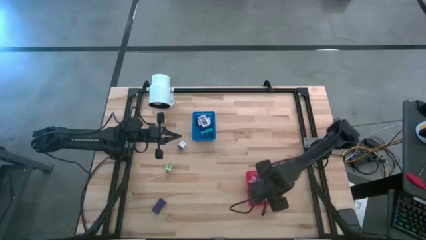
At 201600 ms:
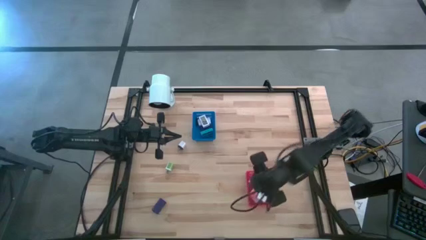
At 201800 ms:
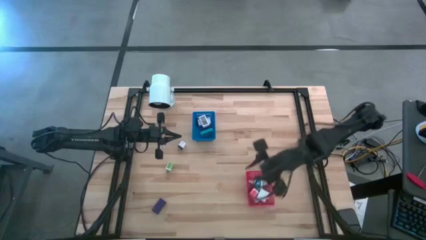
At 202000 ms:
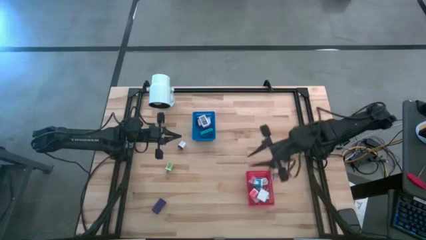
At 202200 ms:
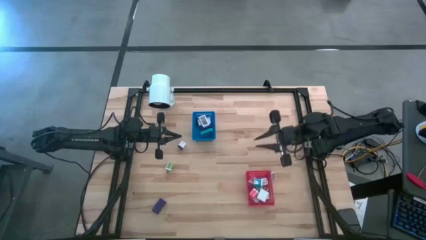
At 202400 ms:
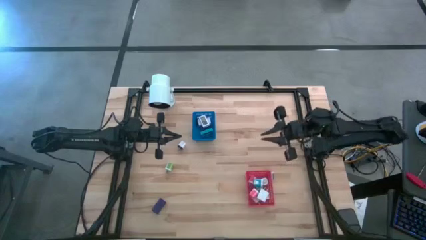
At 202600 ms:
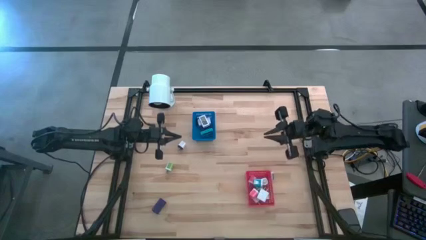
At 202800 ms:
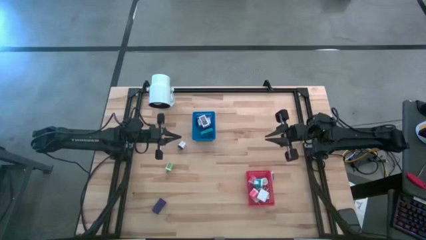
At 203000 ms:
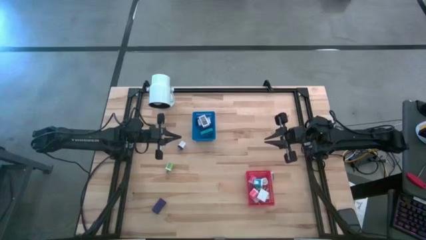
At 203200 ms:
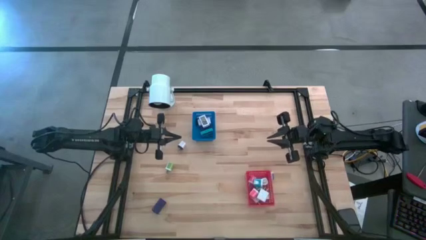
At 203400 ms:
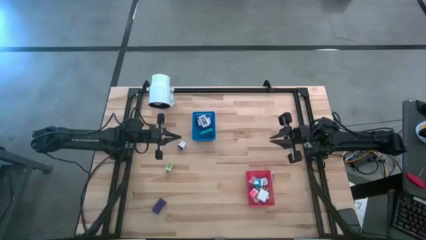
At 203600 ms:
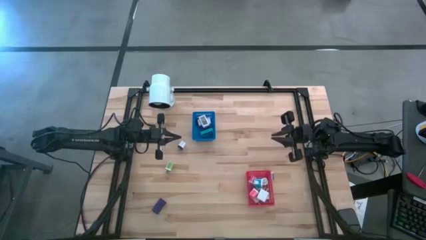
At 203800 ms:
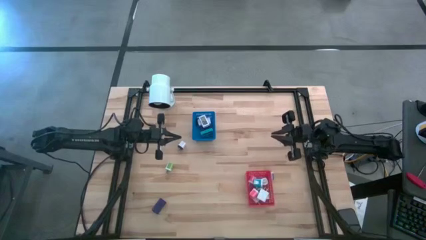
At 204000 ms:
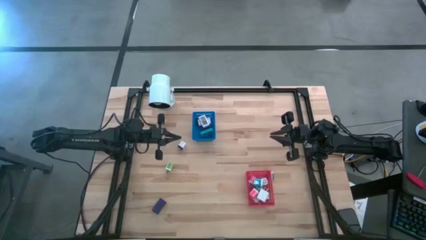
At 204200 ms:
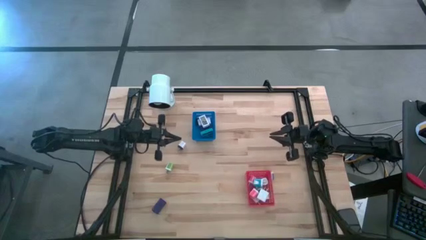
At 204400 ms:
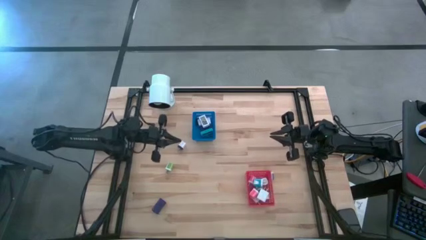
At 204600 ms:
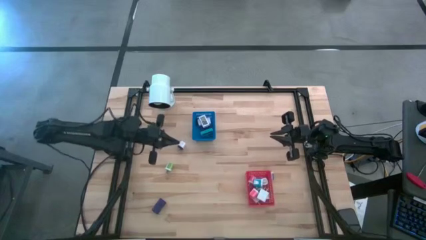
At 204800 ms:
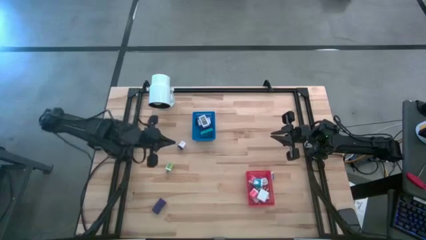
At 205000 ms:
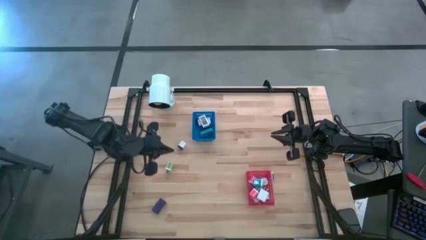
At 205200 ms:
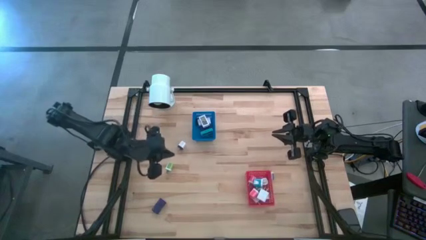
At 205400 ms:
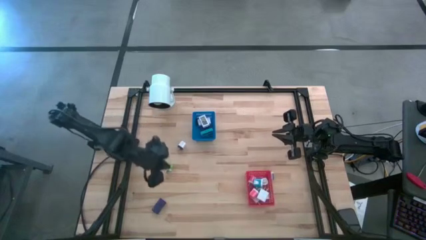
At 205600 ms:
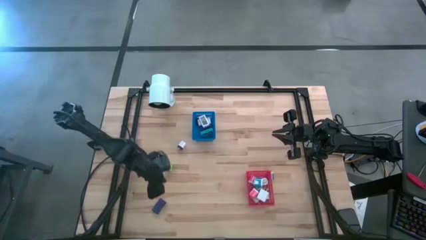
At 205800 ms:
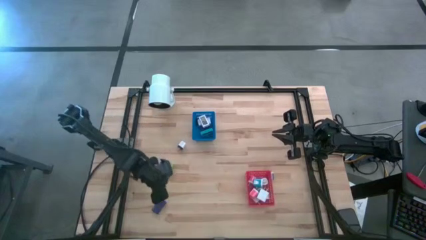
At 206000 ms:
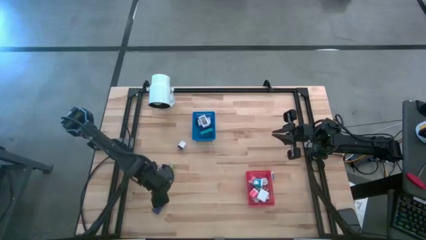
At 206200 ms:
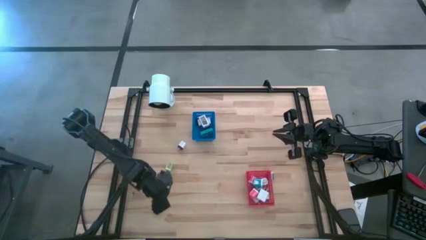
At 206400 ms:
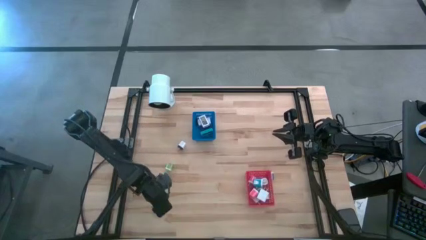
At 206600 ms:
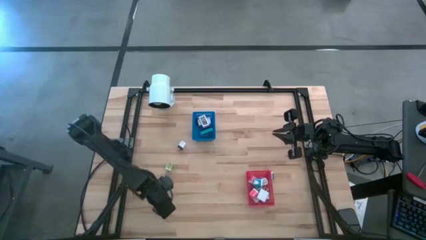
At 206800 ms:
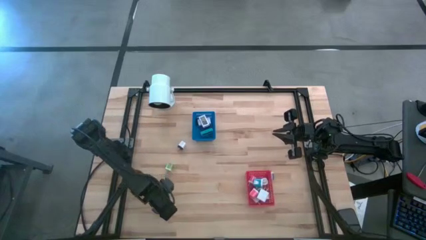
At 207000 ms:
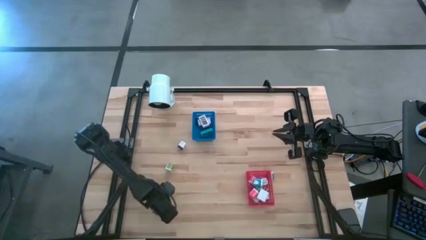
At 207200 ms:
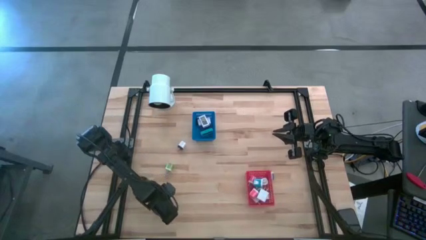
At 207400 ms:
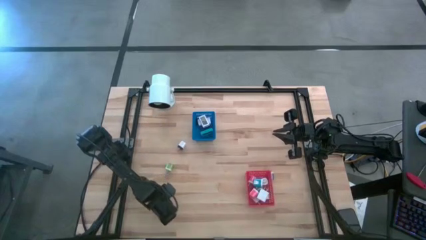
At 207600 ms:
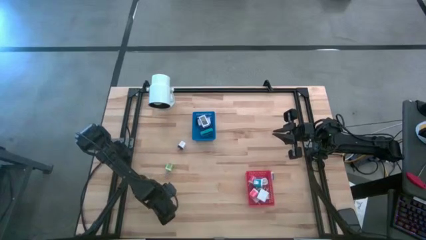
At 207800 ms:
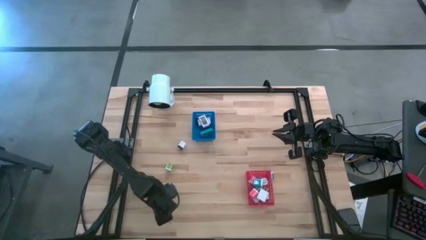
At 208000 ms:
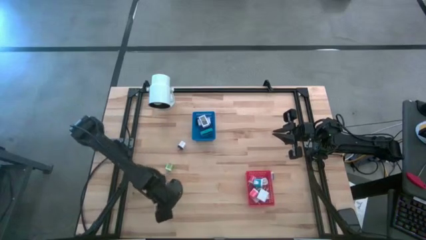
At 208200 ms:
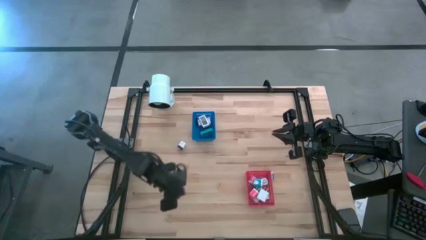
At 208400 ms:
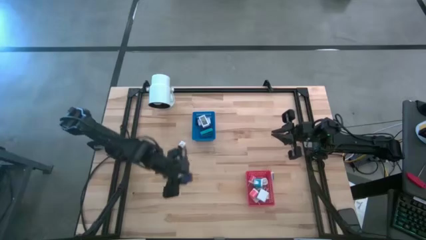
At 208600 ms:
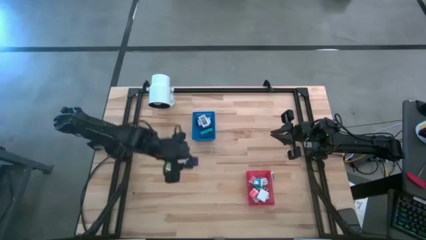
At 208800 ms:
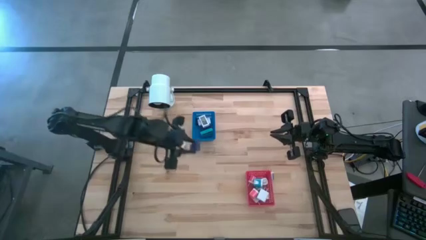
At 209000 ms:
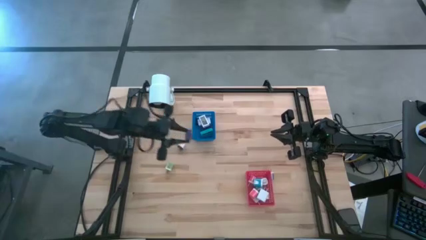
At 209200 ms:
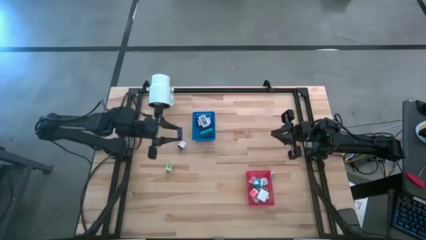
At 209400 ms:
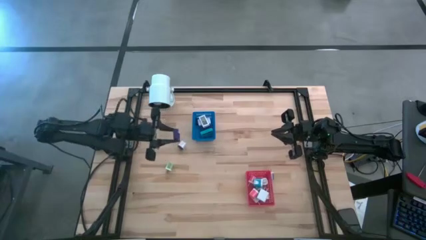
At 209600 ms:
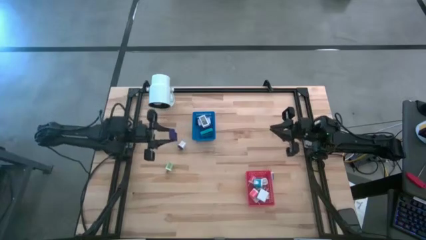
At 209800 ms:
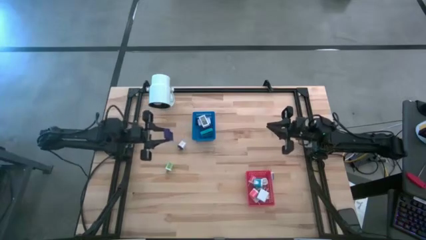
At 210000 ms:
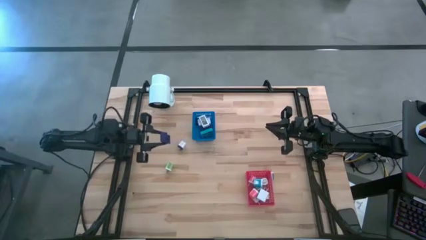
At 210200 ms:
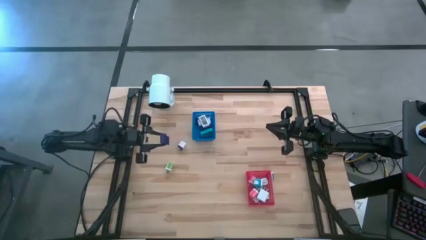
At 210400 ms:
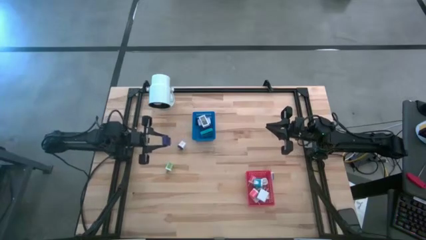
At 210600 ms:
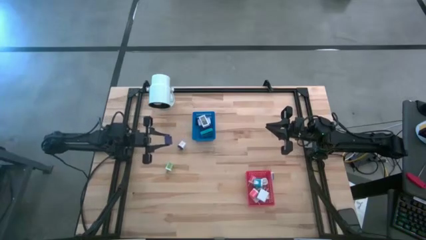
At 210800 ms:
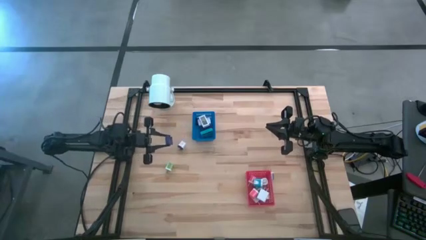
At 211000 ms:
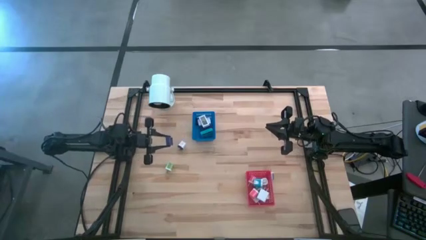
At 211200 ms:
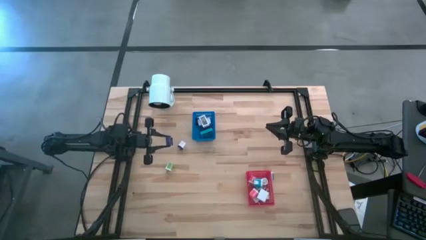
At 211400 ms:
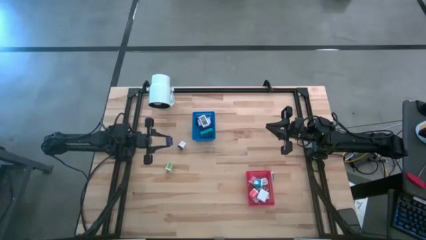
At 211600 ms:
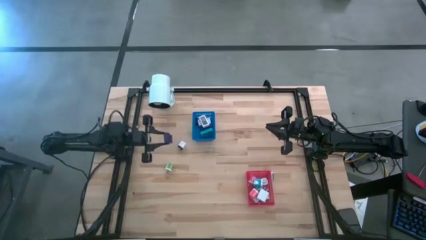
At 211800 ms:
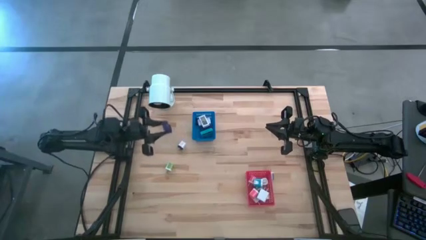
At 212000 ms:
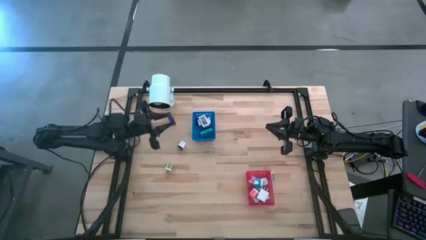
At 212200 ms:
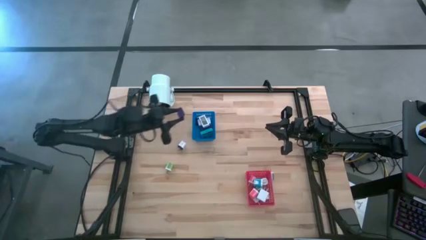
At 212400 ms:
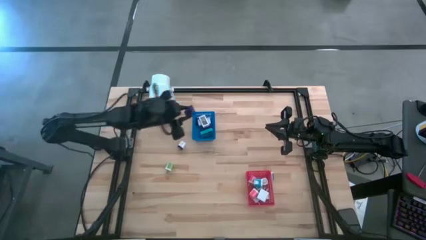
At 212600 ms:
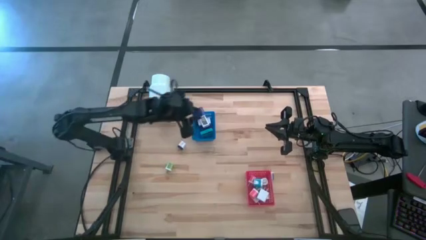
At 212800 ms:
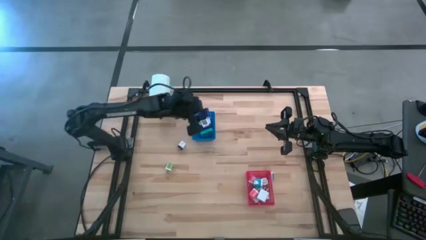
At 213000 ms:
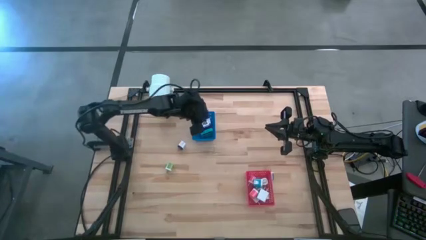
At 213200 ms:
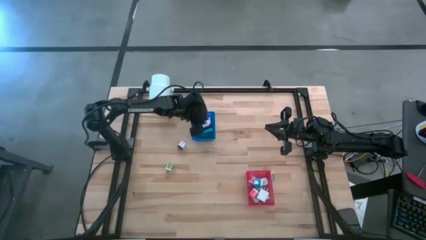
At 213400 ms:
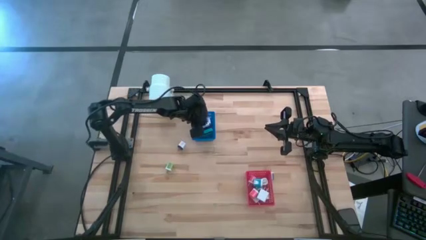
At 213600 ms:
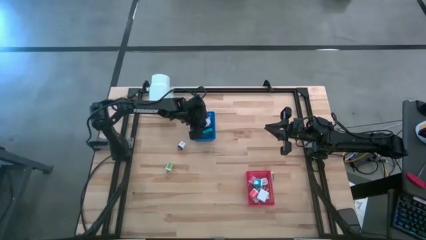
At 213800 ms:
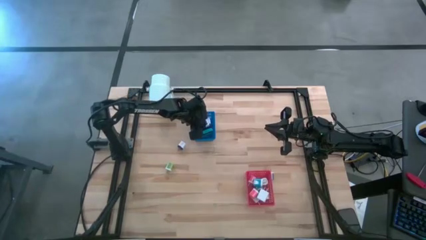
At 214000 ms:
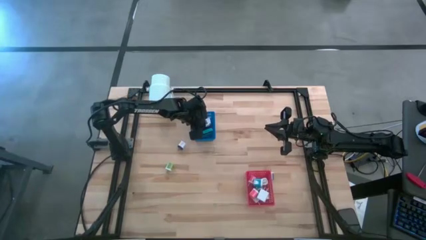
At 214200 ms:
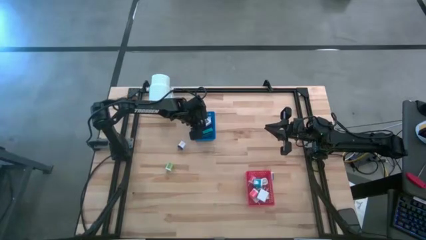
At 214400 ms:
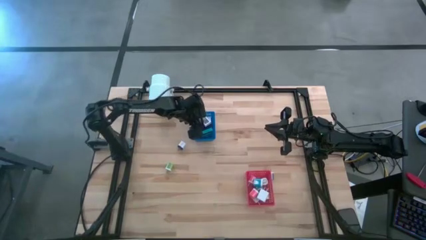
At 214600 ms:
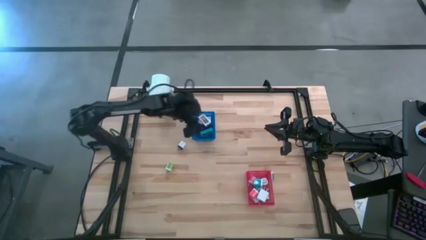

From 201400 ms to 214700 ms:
Task: Pick & Place Office items
Put the dark blue digital clock into the blue bin

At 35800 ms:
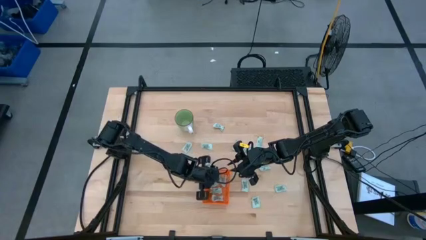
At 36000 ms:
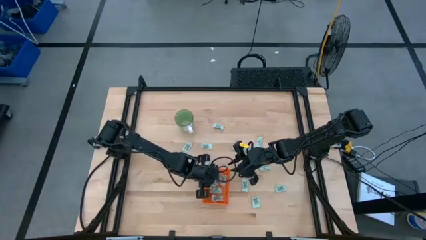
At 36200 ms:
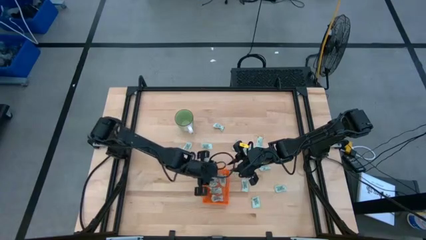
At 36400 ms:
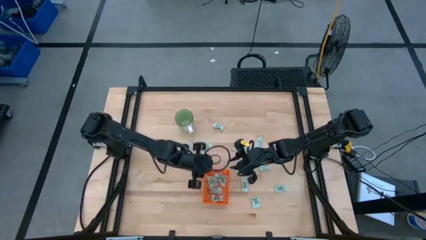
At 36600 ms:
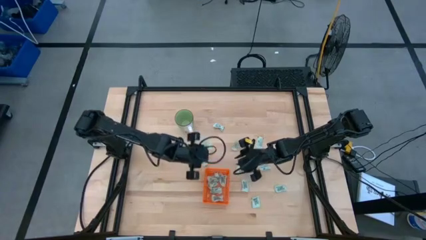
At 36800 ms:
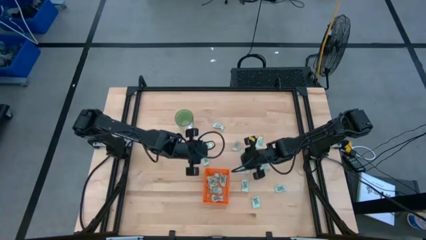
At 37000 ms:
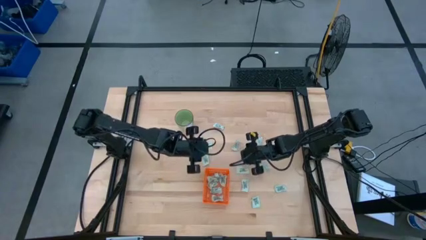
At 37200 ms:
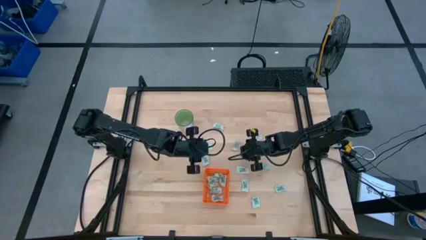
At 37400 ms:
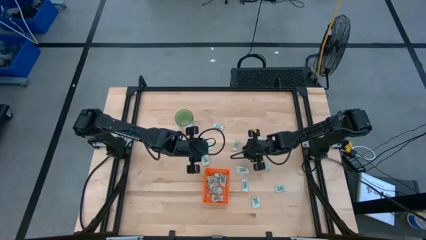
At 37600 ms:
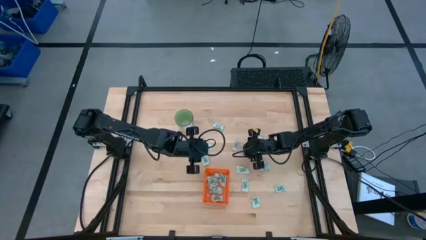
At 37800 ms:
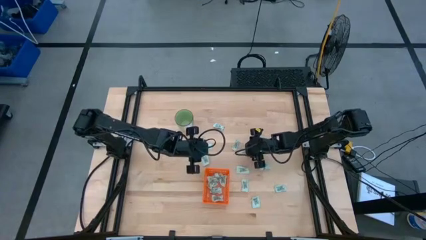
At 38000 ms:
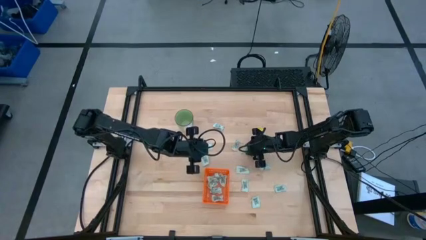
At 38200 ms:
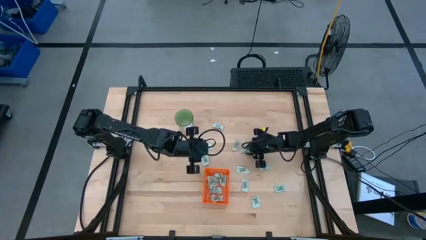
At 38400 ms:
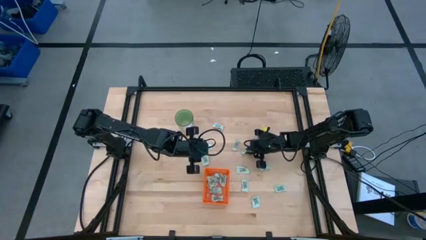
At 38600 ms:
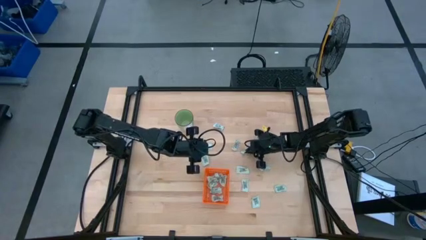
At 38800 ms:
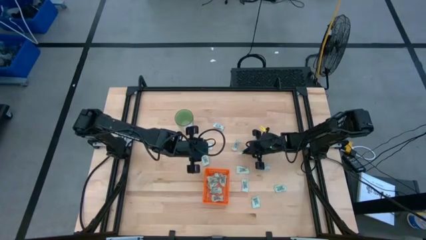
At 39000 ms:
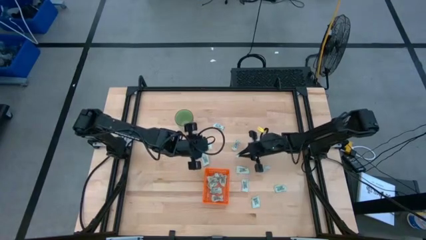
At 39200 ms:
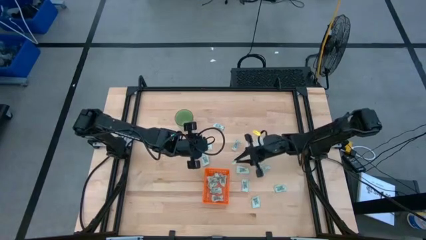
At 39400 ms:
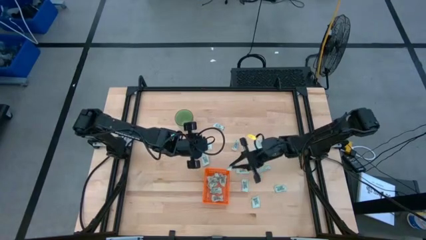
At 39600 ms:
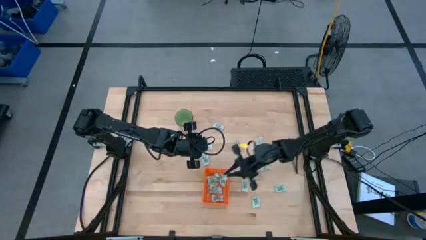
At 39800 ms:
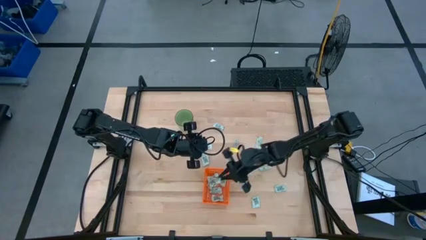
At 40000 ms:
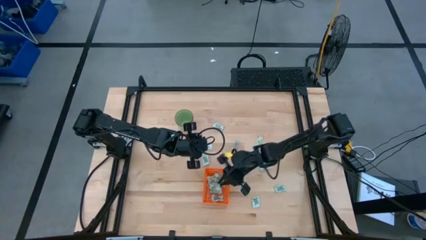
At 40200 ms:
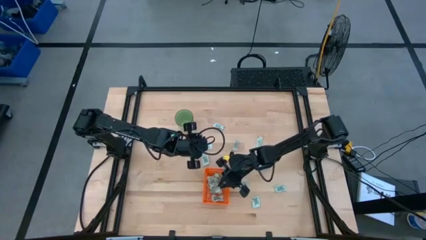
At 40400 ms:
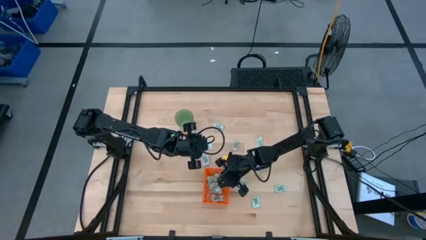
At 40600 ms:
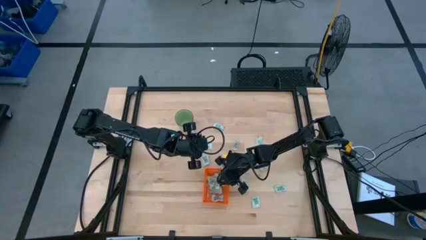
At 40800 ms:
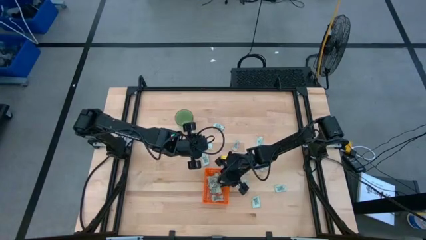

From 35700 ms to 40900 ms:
Task: Pick and place Stevia / Truvia into bins
Put the stevia packet into the orange basket
